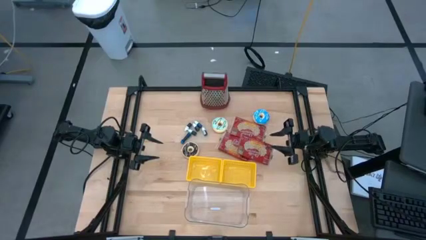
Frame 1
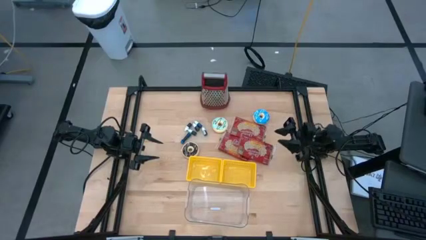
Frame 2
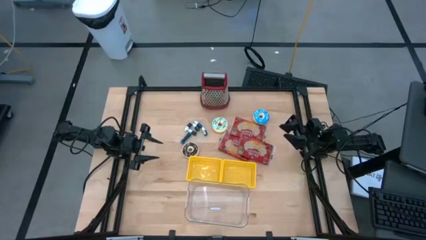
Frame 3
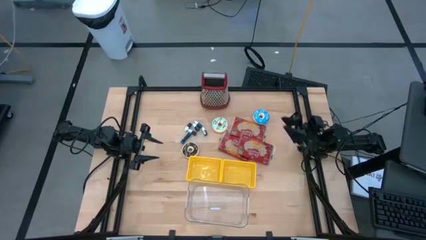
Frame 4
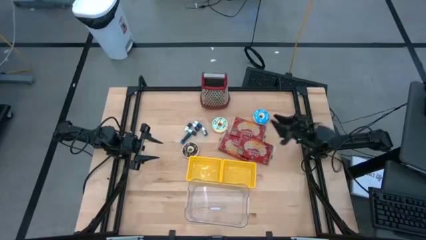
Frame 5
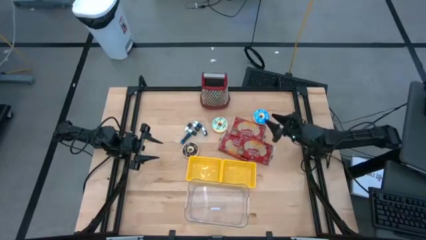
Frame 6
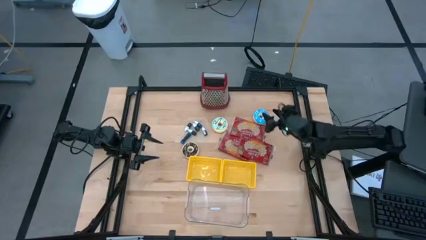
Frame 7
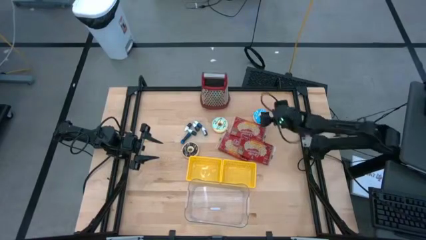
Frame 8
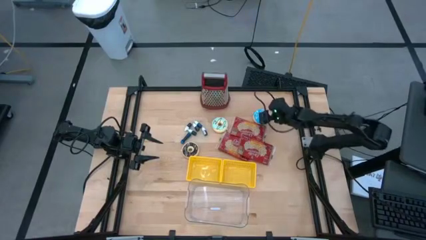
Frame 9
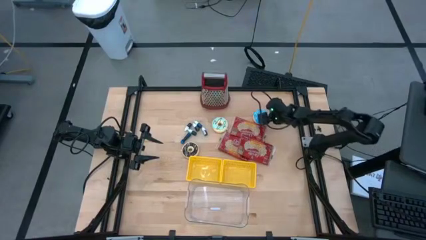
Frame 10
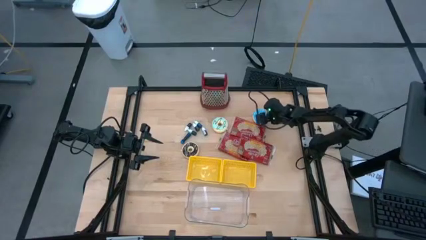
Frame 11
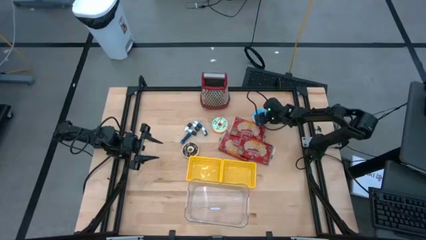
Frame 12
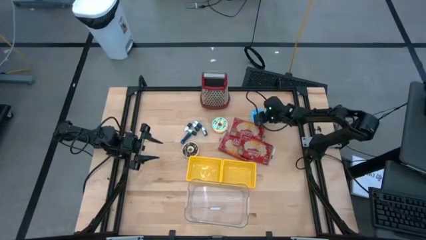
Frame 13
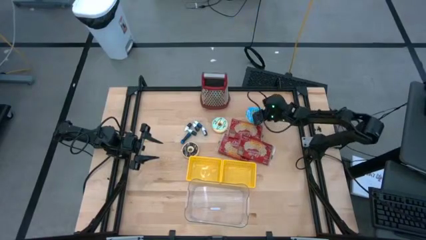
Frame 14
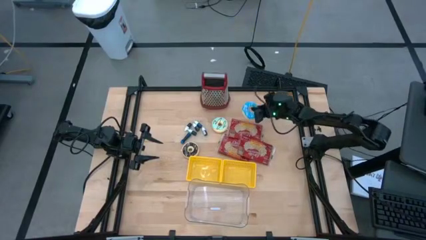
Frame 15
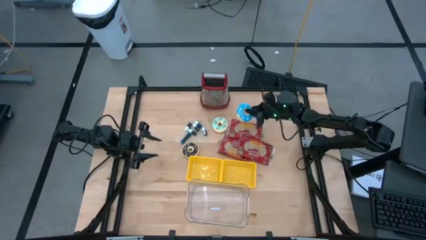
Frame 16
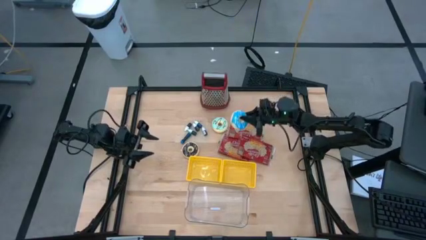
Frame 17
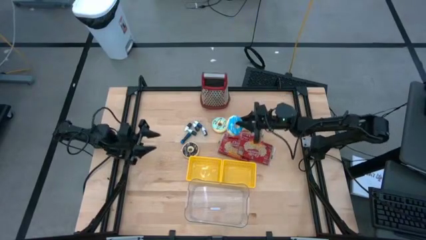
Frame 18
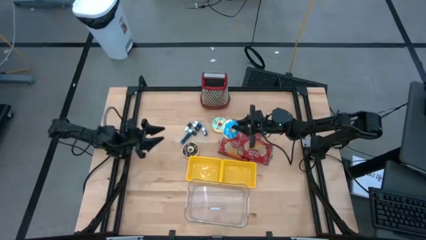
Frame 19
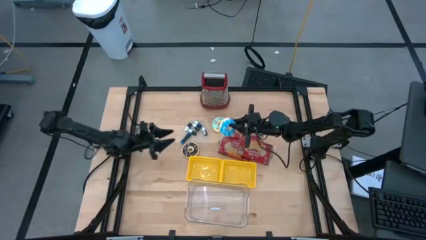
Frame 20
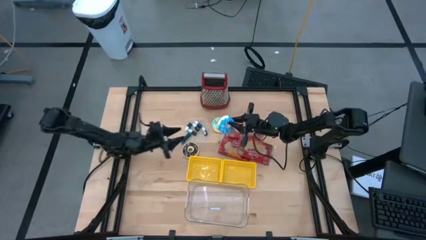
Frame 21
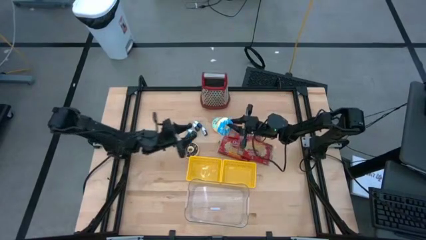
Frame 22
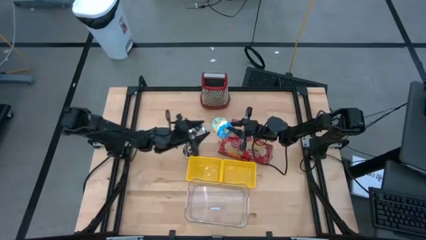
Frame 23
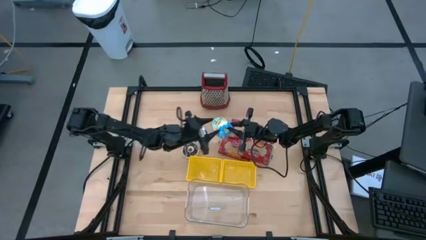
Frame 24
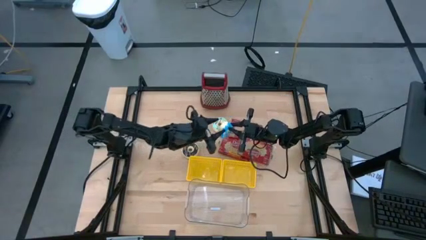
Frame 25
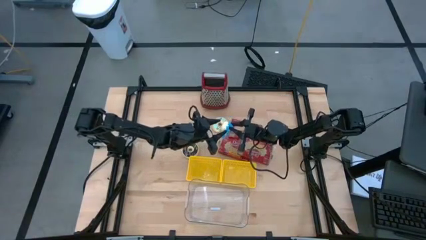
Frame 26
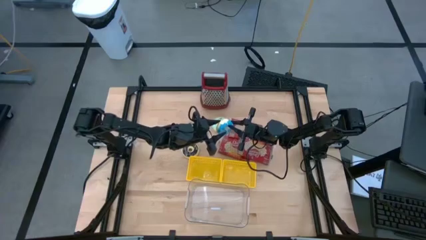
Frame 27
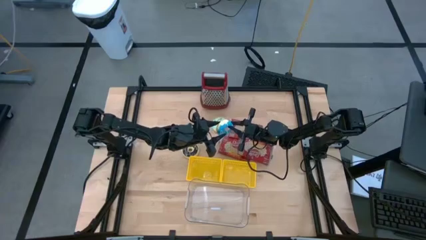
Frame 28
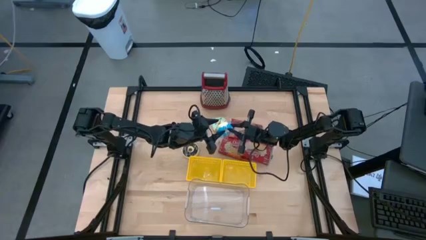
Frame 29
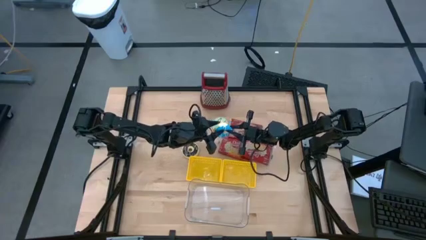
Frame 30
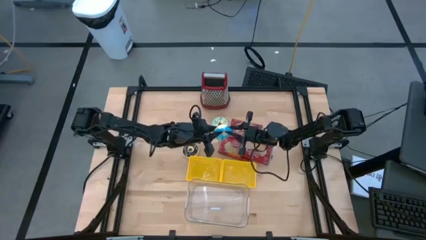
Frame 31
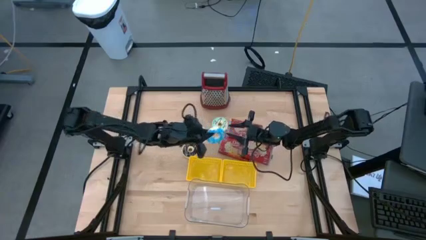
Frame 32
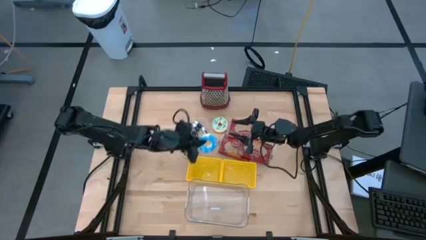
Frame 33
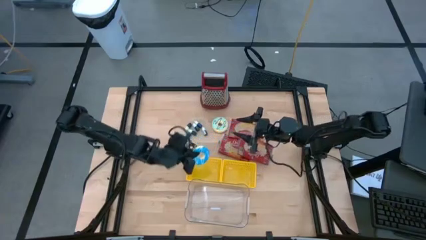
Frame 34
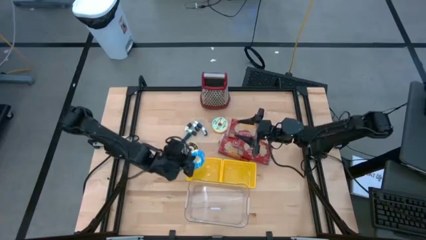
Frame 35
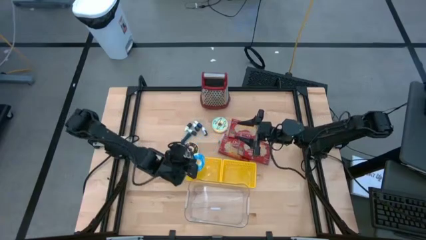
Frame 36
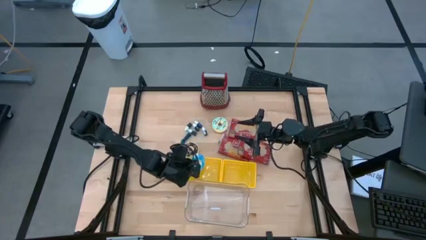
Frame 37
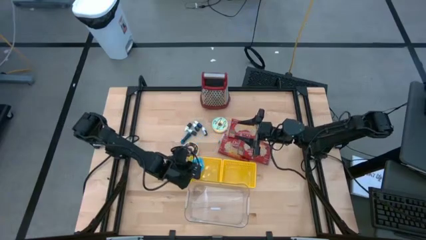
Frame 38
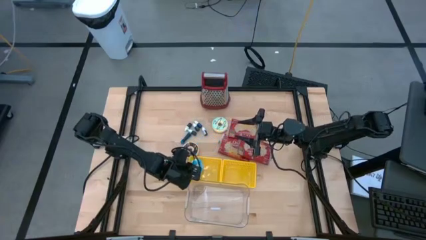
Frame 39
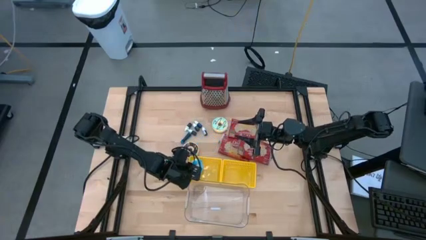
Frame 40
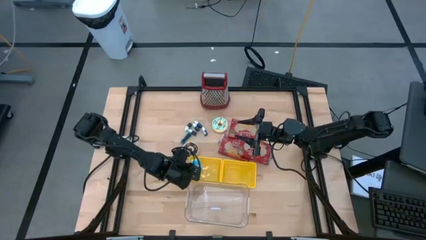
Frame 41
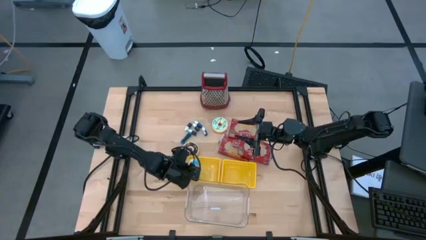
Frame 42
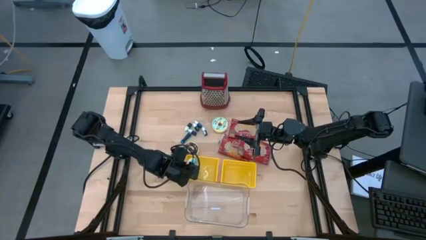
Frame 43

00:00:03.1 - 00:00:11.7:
Put the blue donut into the left yellow bin

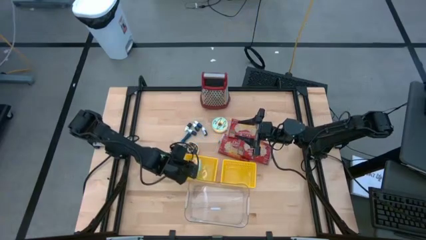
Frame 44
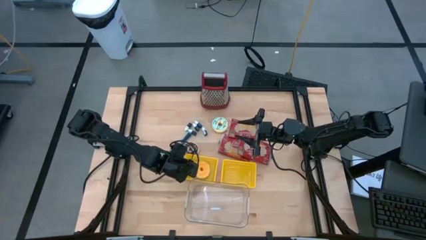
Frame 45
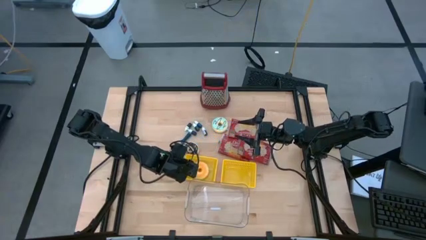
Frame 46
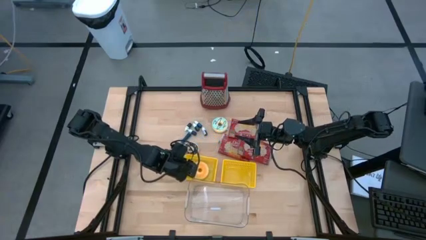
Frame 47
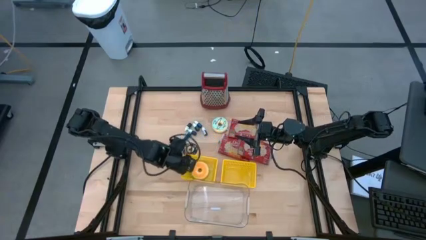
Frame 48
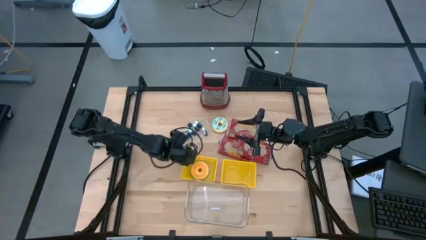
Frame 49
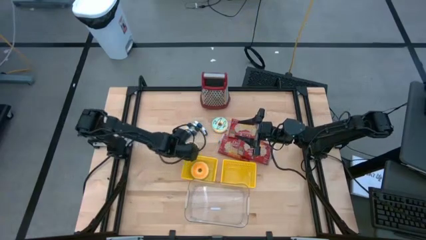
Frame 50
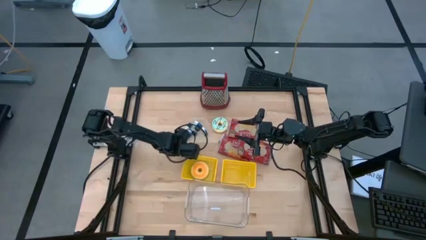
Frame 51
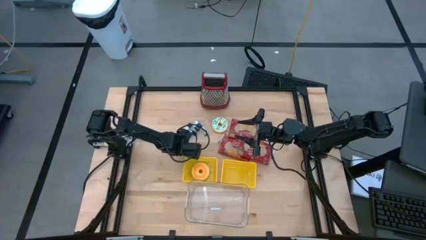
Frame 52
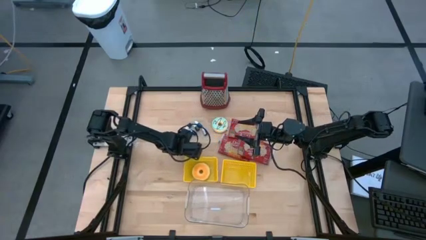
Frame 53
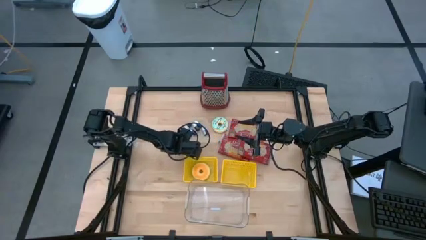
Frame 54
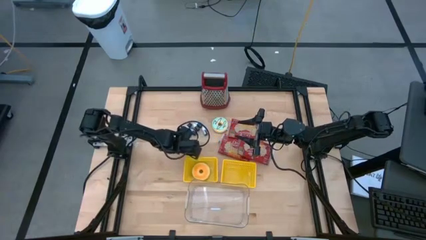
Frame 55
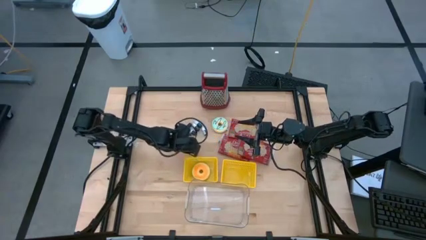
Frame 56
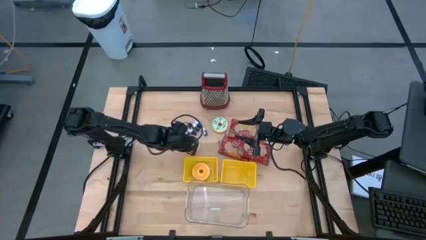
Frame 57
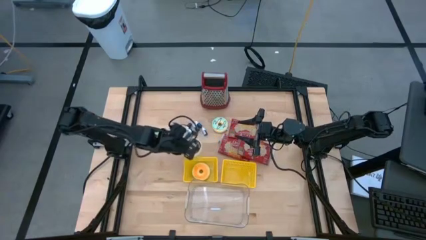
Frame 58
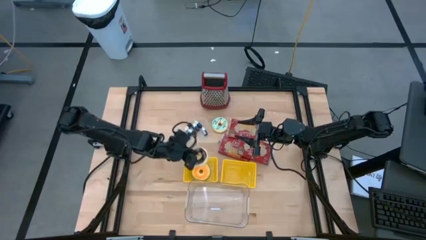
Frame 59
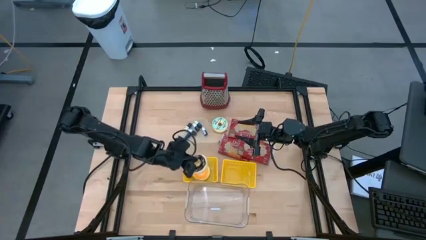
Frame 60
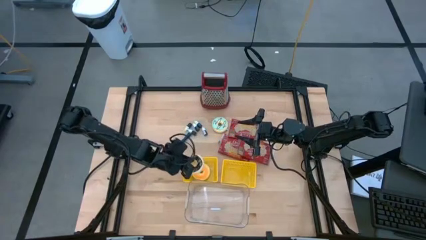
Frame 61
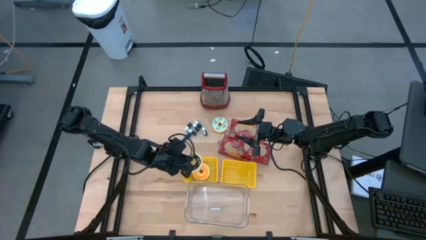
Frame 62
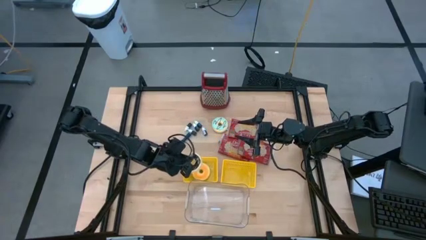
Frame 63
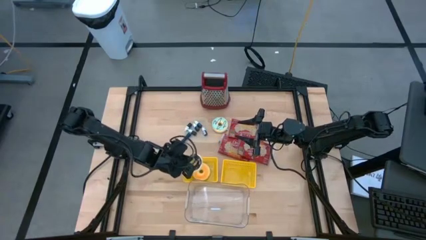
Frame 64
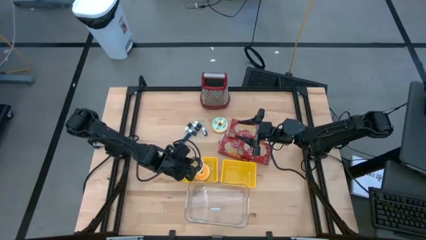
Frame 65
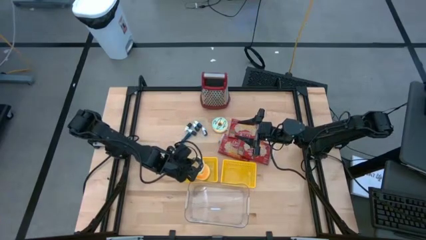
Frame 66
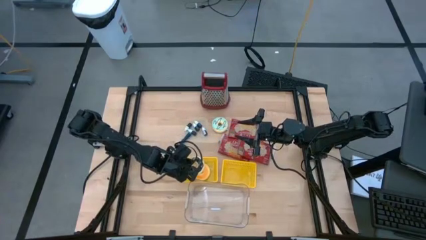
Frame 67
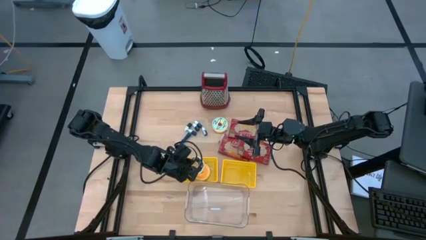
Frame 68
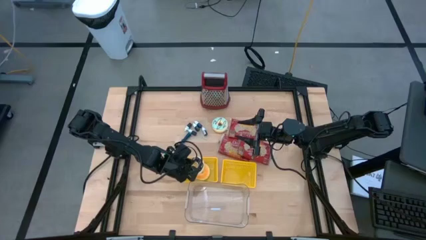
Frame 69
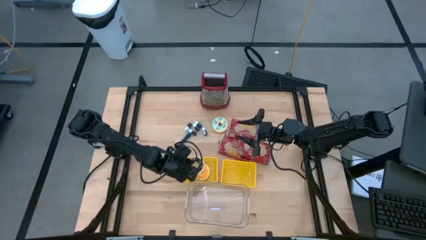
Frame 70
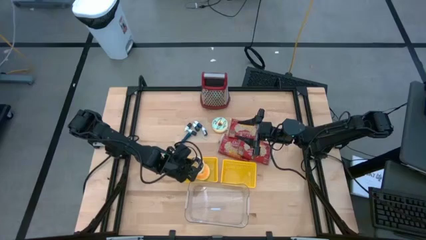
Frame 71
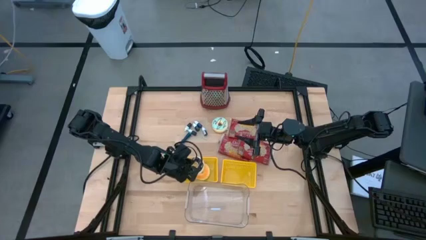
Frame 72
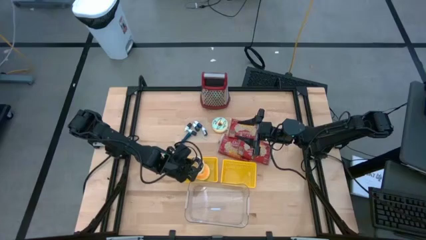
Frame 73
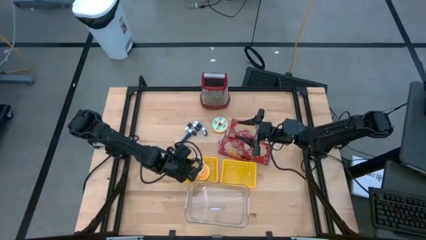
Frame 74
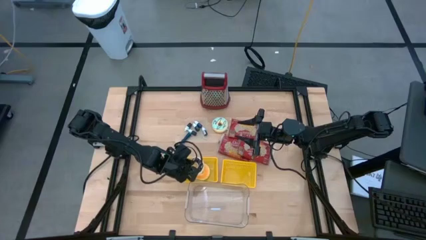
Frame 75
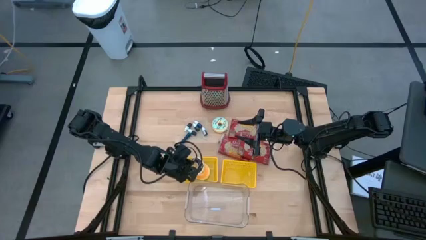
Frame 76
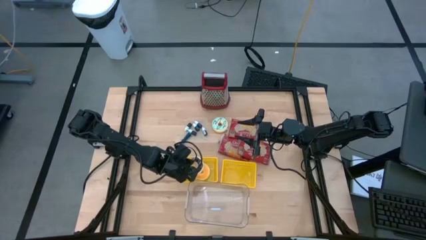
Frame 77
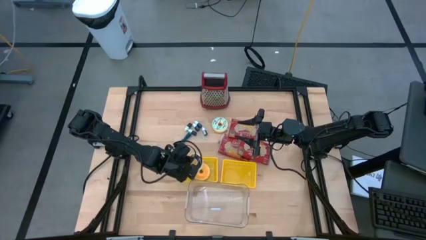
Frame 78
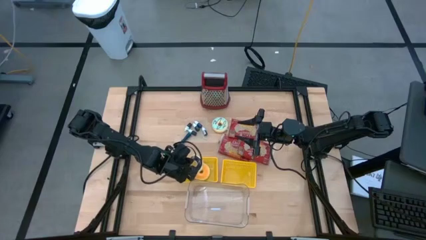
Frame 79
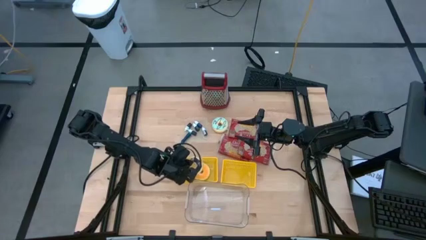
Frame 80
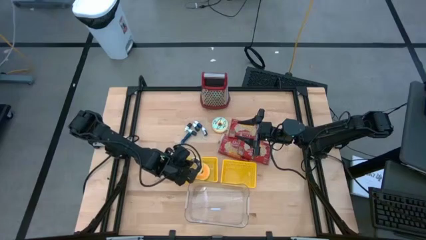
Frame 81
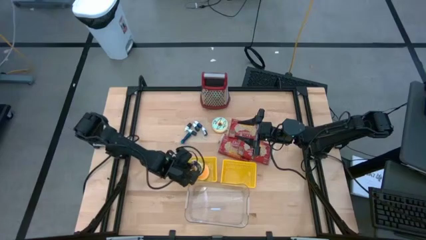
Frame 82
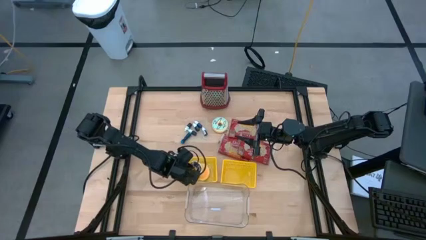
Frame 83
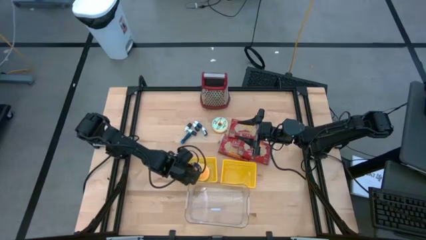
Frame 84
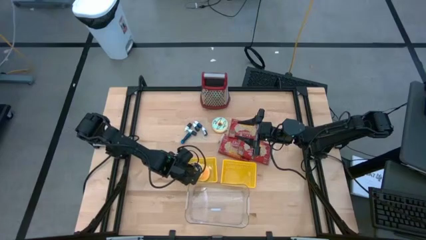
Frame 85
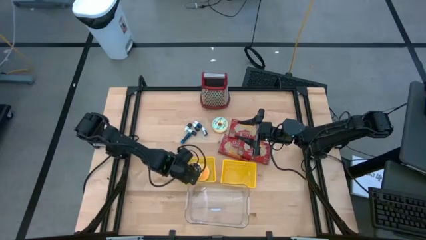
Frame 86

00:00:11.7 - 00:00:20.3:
Put the black donut into the left yellow bin
